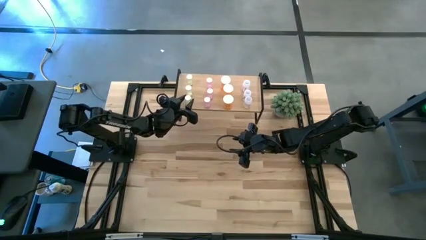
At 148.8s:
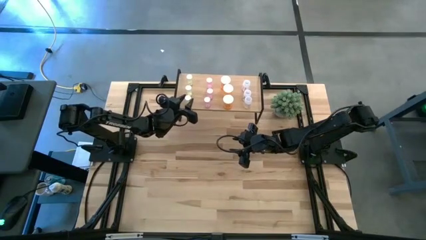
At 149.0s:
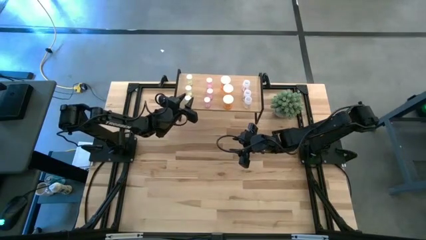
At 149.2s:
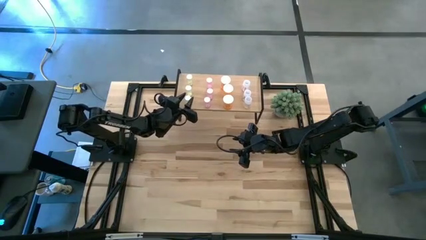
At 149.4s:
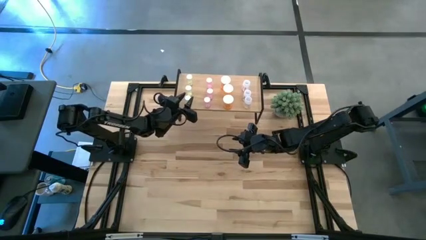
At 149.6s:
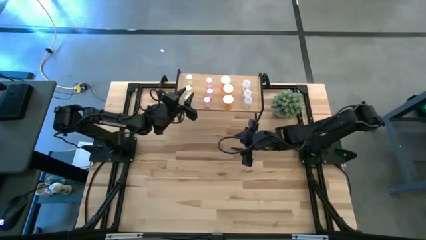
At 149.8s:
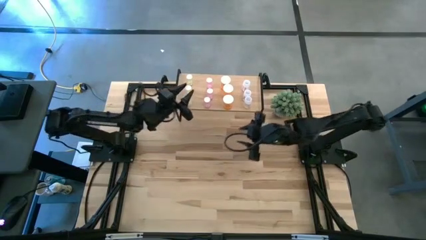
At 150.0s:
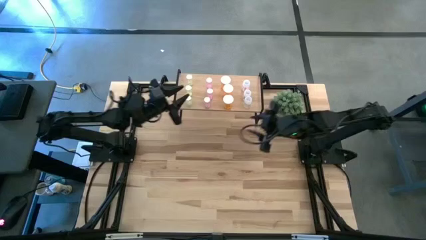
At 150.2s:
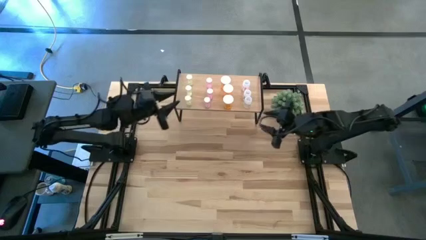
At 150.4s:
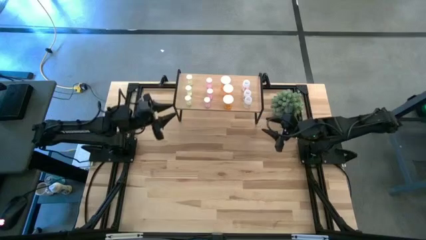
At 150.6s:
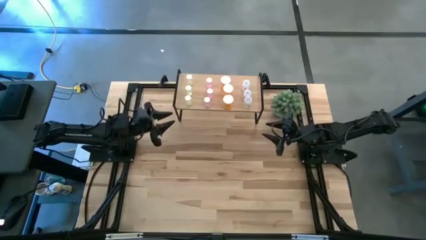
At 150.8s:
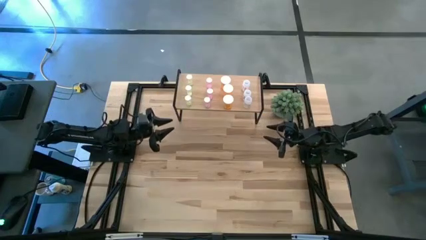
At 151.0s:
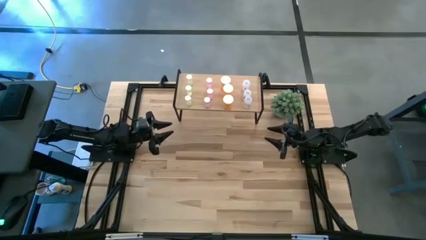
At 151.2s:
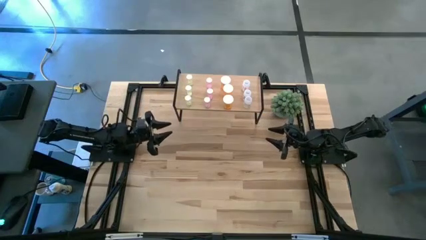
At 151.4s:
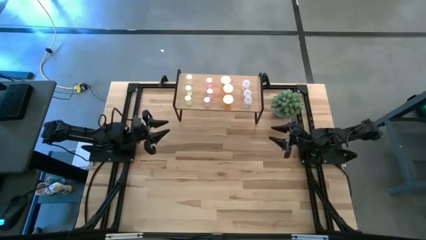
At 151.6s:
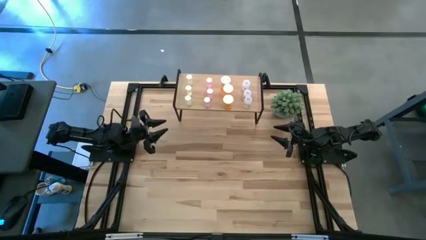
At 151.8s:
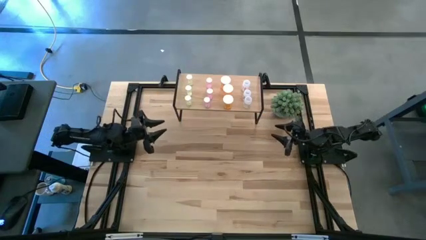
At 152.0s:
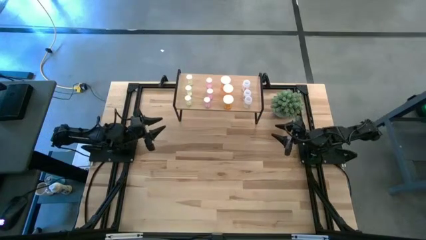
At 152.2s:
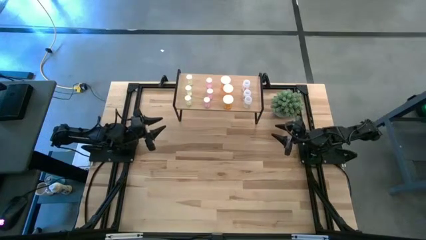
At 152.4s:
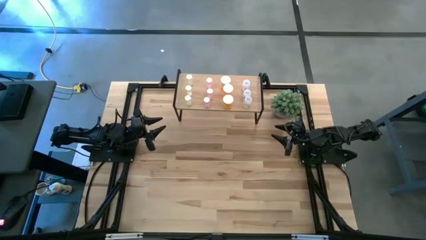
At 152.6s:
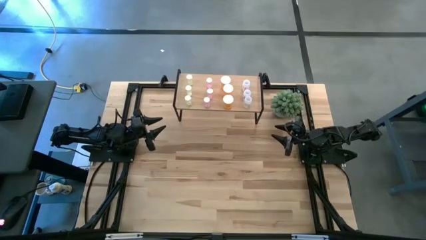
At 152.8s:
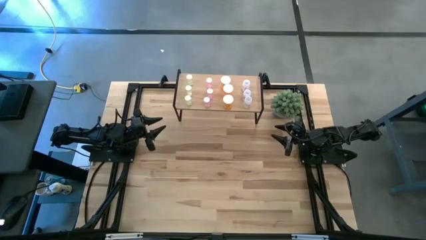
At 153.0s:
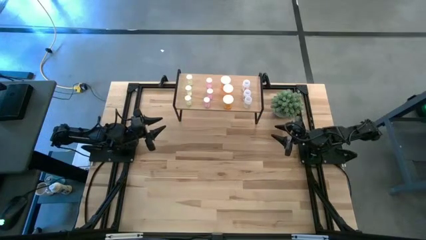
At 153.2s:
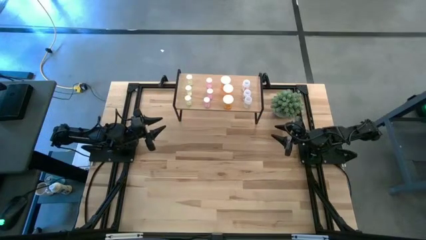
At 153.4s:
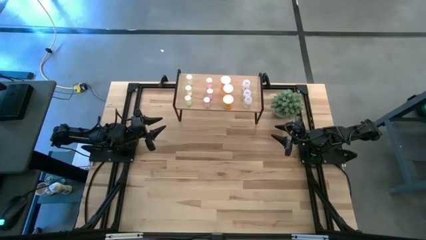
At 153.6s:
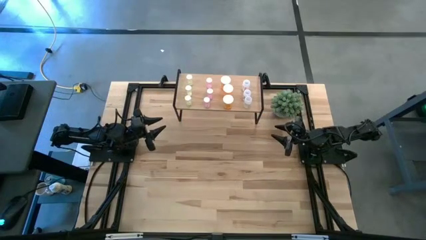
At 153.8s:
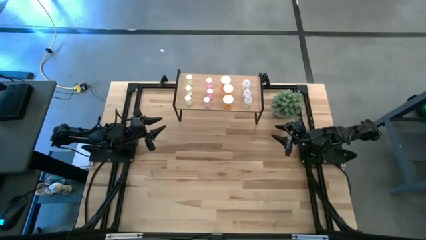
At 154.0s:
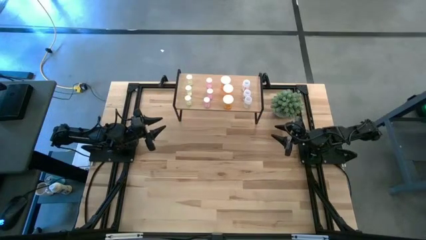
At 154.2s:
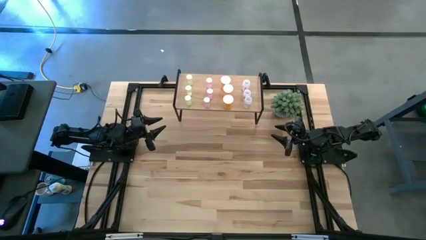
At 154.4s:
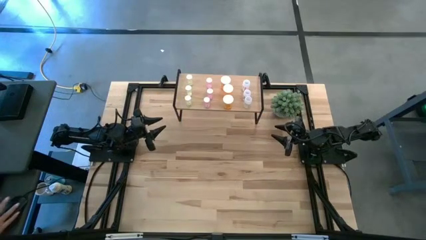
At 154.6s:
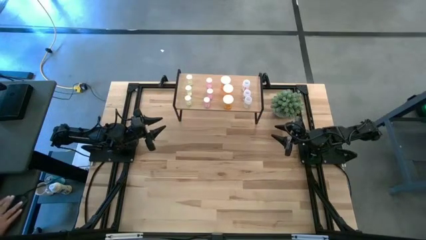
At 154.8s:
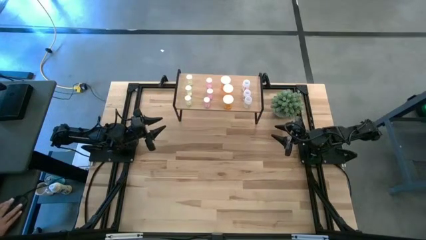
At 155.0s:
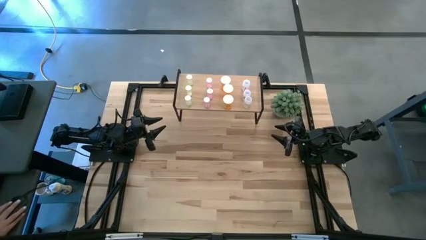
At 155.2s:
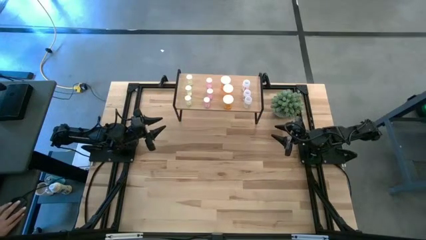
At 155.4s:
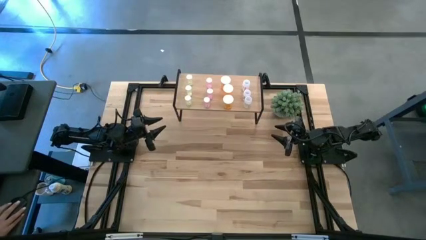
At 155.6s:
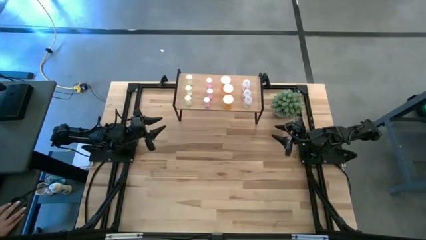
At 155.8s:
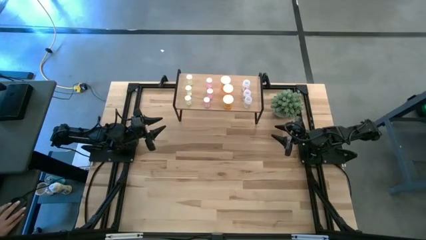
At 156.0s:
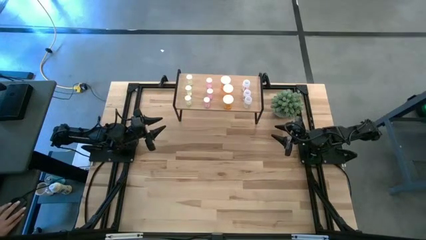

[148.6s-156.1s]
Task: Pick and place medicine bottles onto shelf by color
Return to Home Position

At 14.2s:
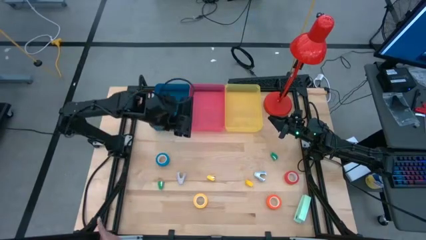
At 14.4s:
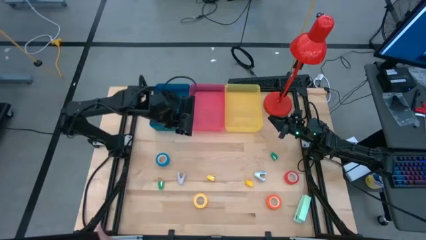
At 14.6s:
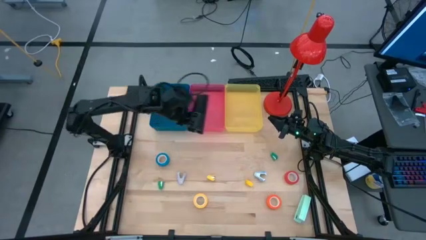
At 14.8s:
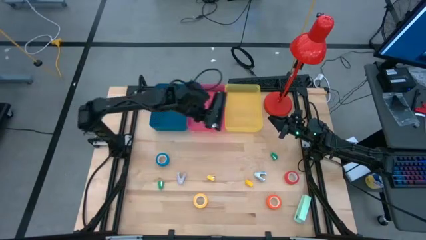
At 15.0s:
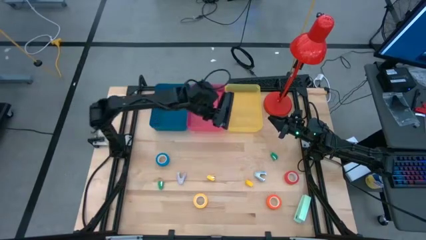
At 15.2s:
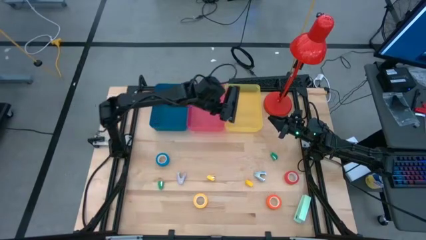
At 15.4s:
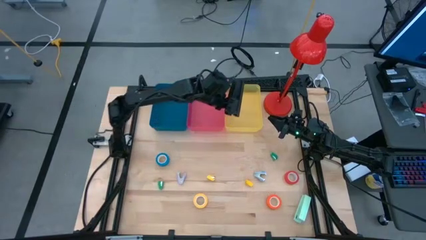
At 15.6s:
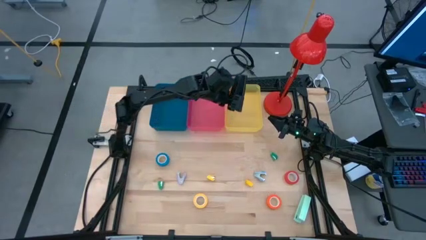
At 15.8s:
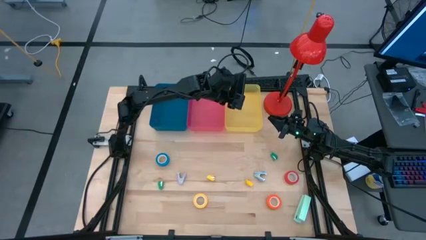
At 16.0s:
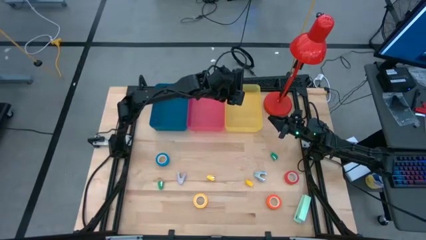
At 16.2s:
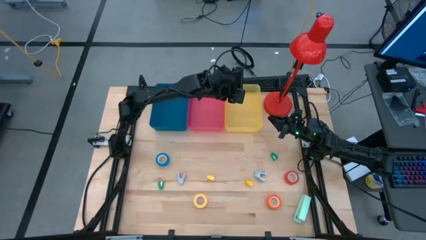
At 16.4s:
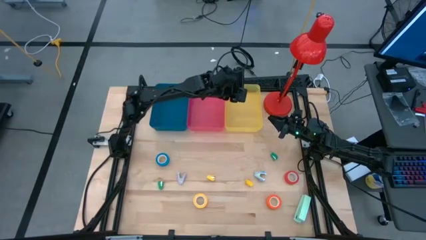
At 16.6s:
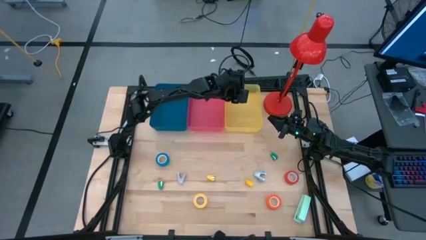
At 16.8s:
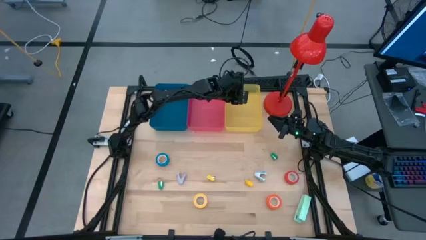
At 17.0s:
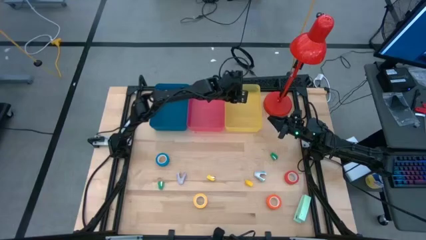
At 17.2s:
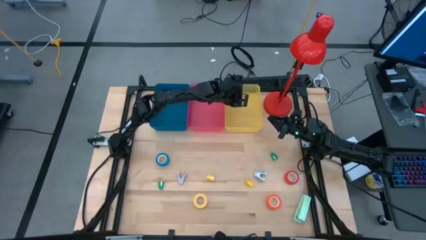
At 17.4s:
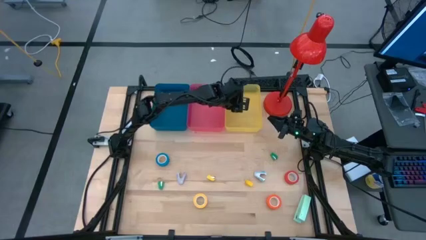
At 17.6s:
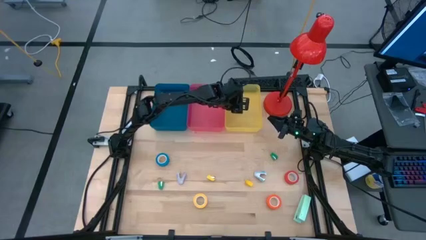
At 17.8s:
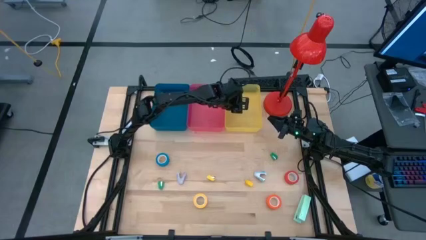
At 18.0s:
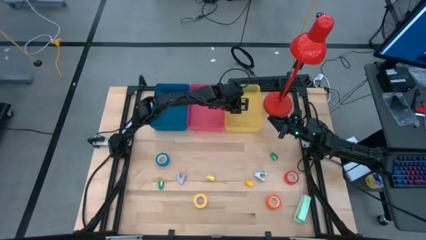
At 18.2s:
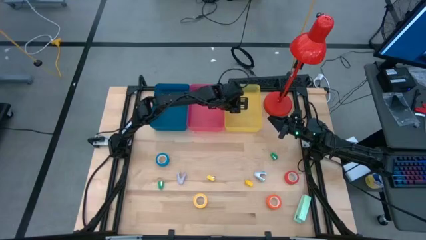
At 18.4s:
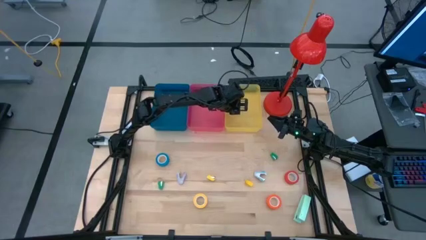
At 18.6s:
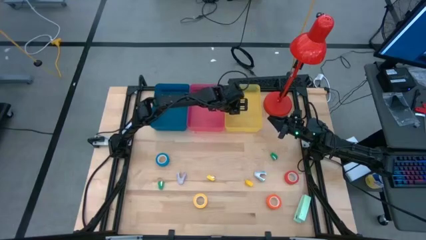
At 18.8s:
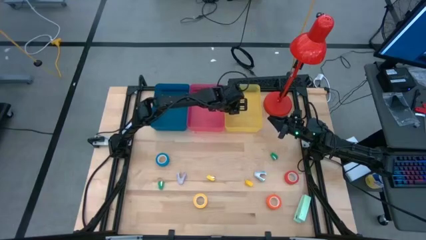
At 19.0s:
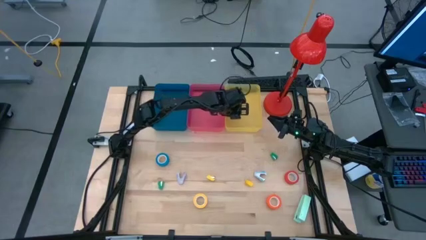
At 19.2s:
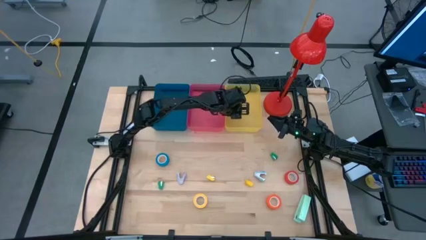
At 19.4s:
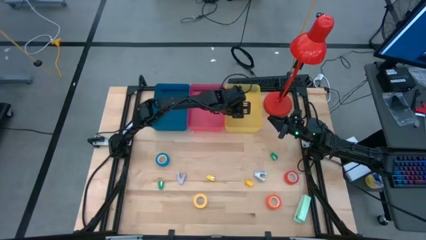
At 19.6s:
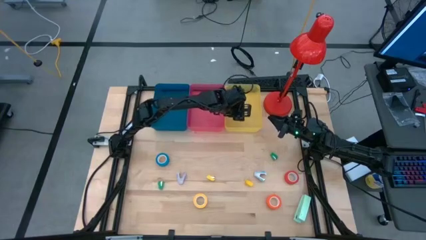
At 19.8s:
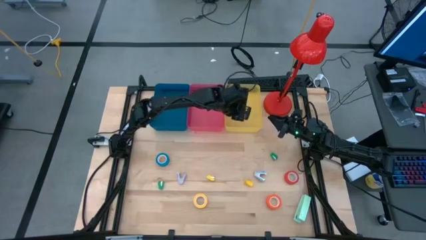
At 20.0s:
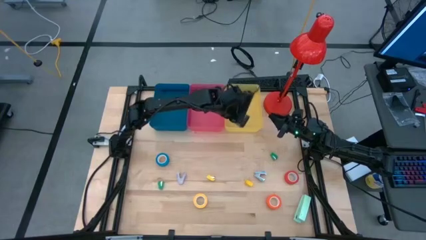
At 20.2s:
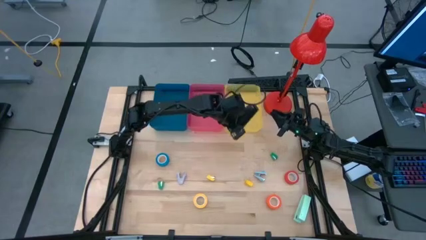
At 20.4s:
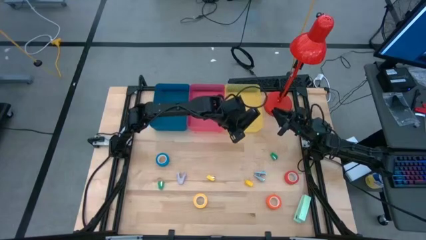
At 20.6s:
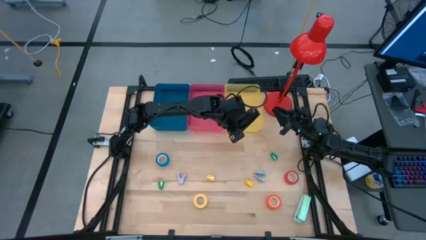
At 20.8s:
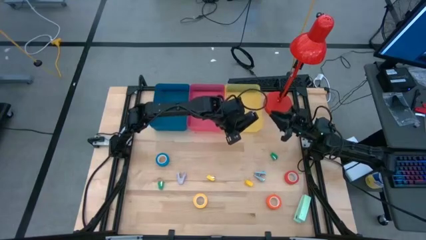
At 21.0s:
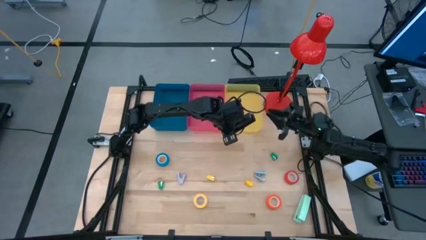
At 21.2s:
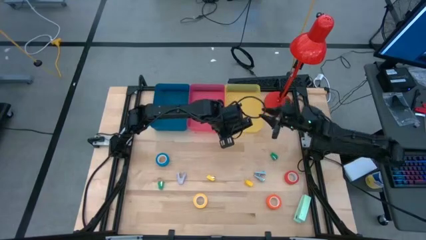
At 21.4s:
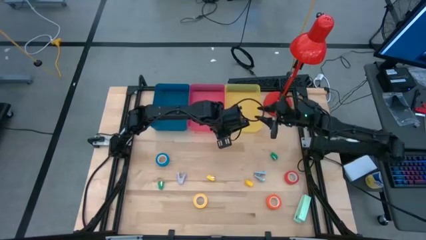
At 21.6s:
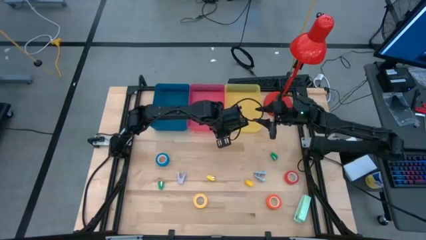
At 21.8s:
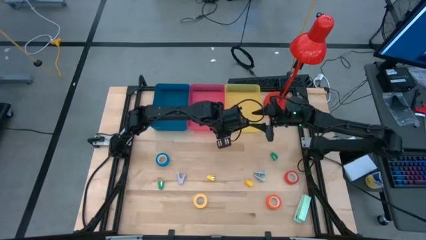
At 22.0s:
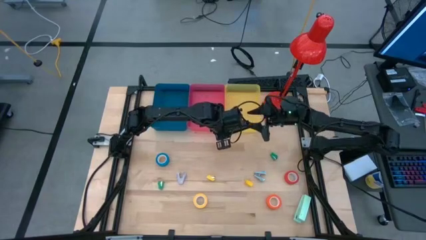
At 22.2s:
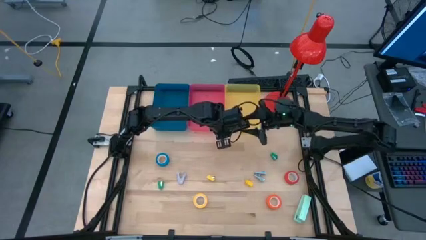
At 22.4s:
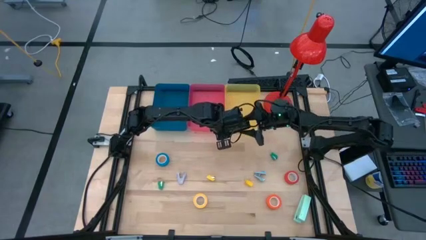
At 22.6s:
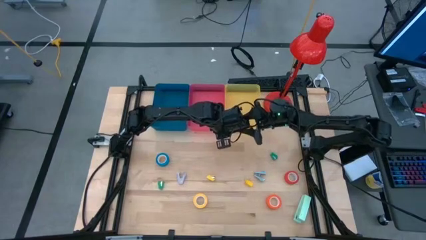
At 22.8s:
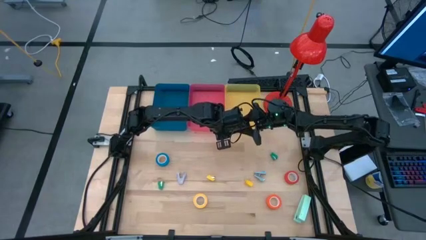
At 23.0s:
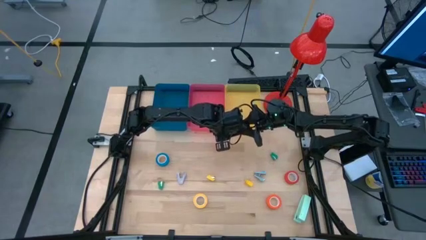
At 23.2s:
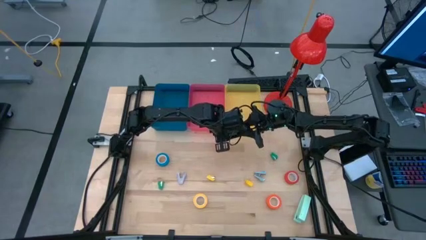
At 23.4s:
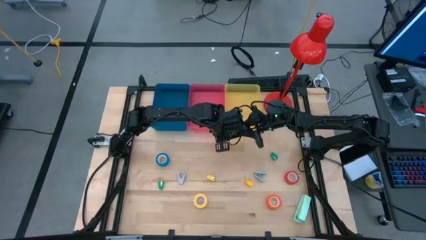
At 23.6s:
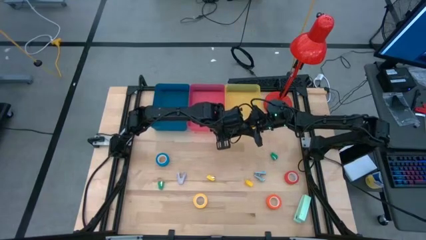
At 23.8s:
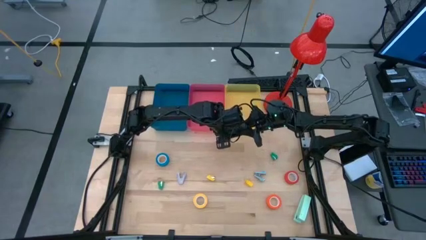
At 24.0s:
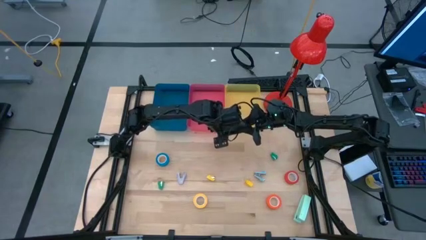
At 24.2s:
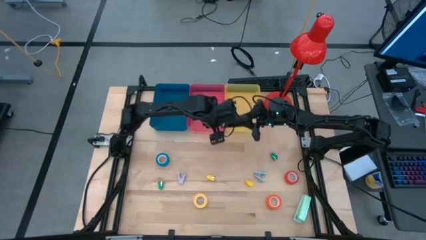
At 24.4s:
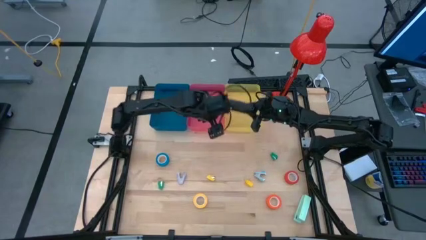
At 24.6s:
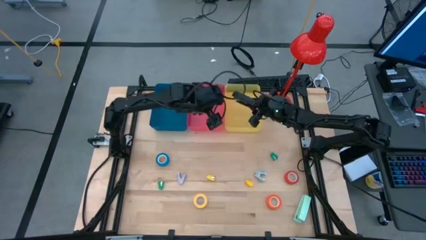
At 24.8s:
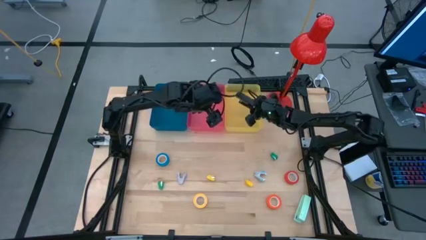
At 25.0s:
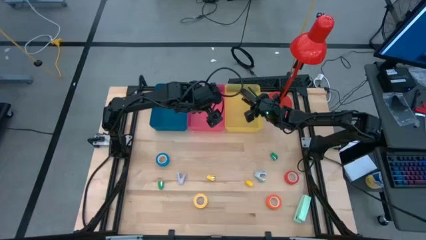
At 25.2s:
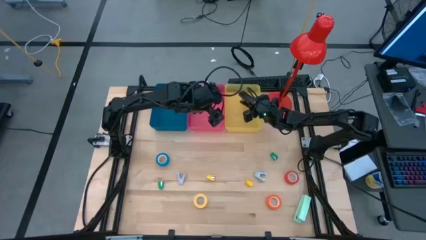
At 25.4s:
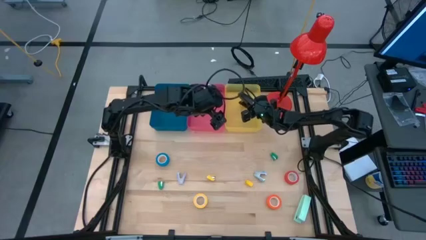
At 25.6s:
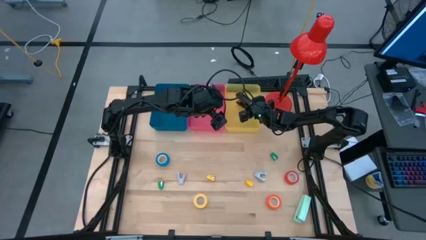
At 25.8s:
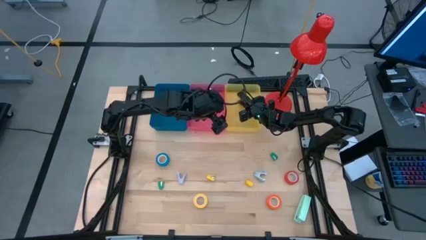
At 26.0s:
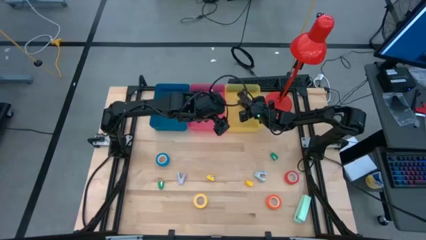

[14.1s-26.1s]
Task: Pick and place Stapler, Stapler remover, tape
Put the large black stapler into the yellow bin
